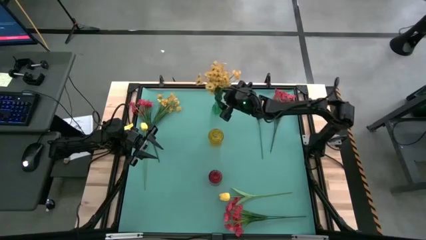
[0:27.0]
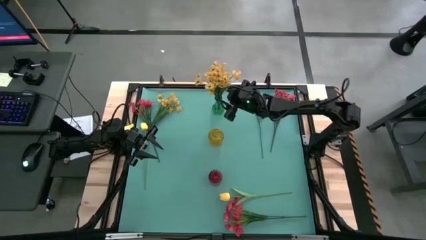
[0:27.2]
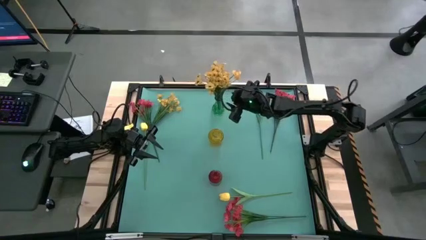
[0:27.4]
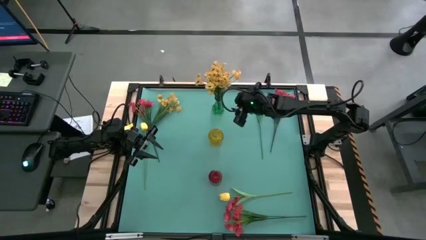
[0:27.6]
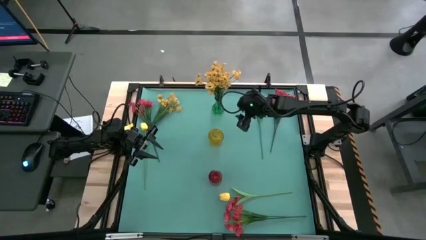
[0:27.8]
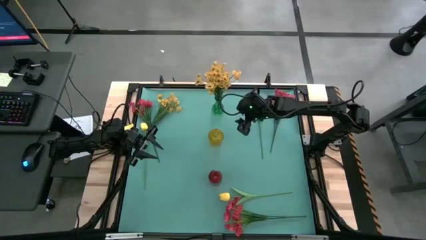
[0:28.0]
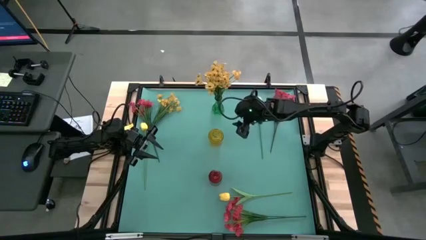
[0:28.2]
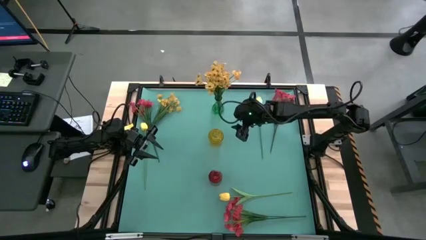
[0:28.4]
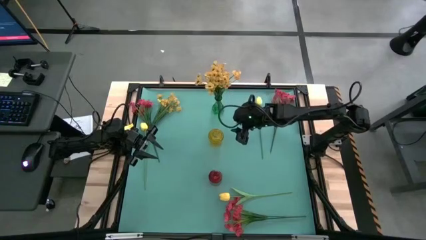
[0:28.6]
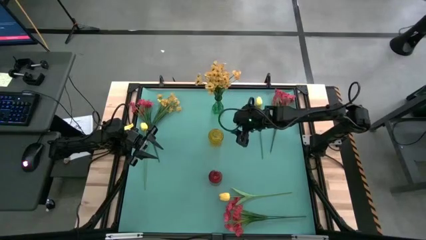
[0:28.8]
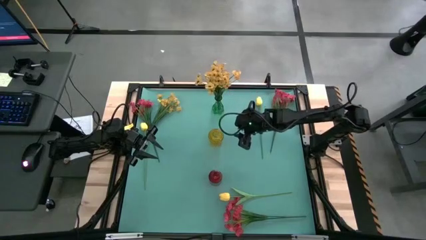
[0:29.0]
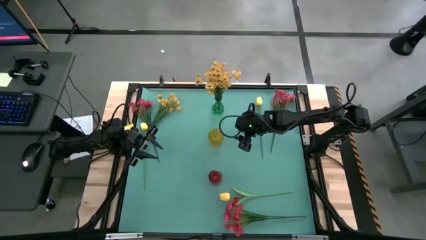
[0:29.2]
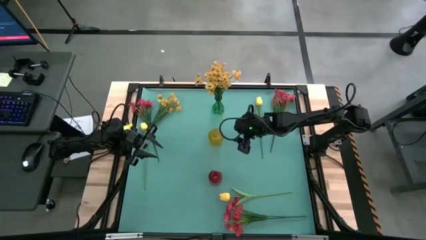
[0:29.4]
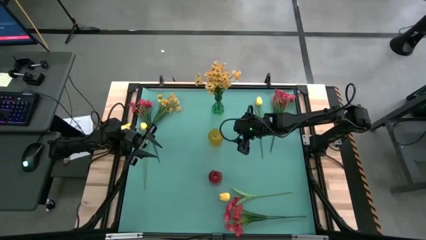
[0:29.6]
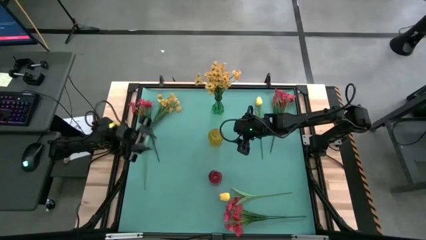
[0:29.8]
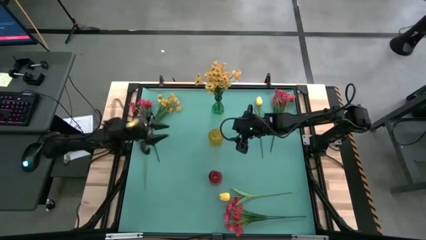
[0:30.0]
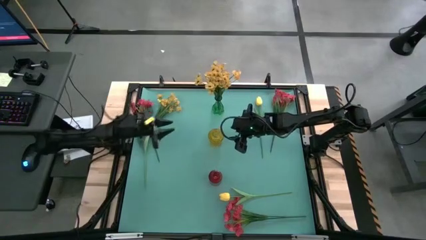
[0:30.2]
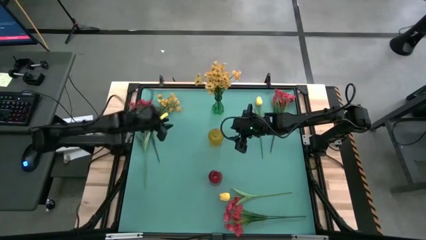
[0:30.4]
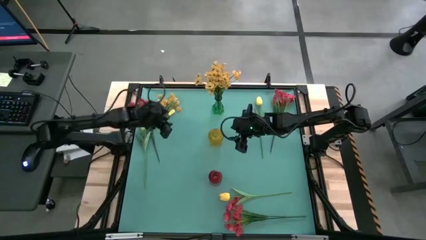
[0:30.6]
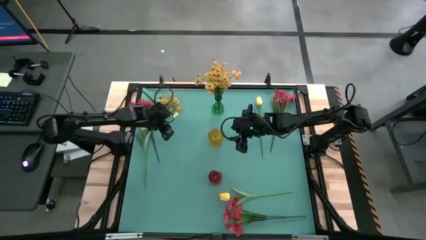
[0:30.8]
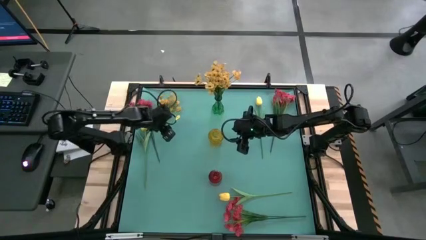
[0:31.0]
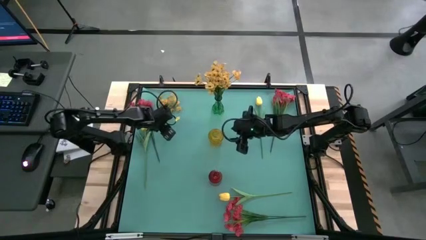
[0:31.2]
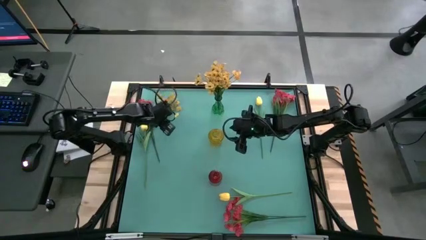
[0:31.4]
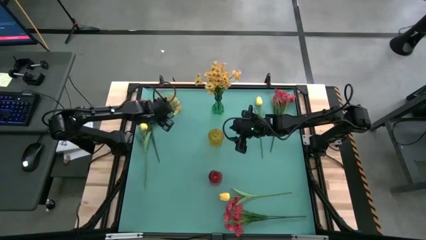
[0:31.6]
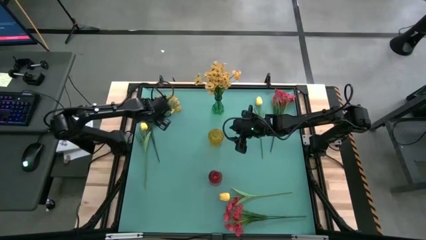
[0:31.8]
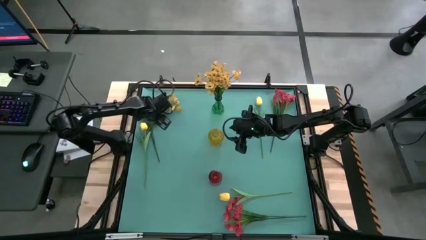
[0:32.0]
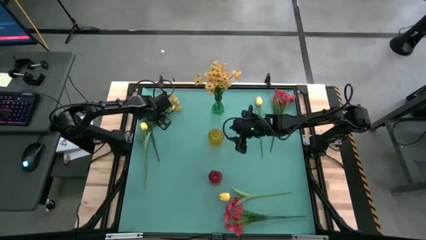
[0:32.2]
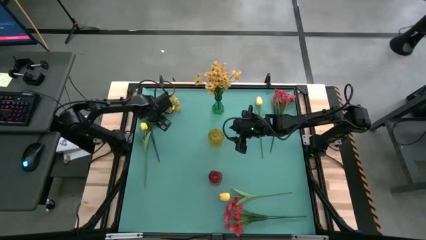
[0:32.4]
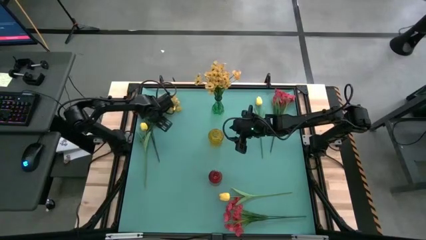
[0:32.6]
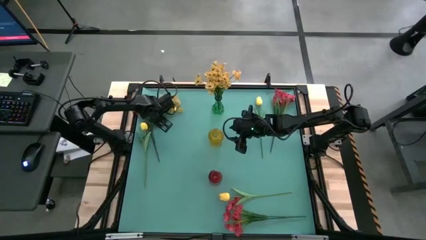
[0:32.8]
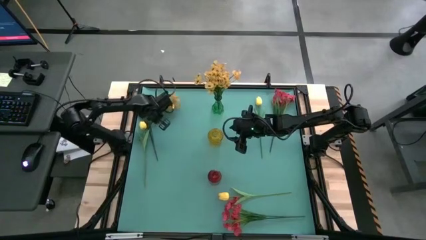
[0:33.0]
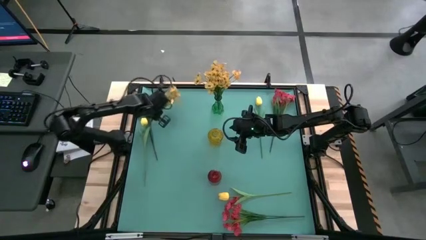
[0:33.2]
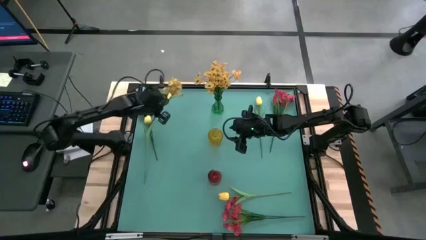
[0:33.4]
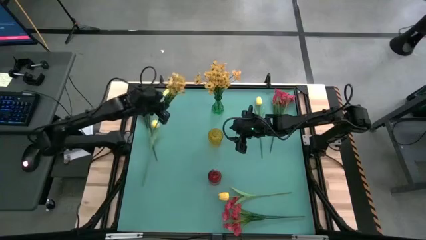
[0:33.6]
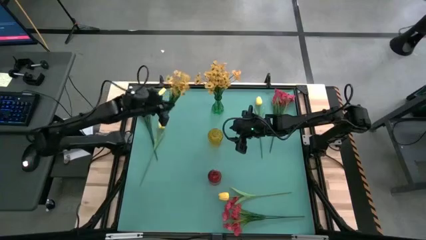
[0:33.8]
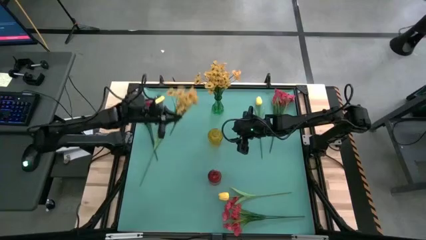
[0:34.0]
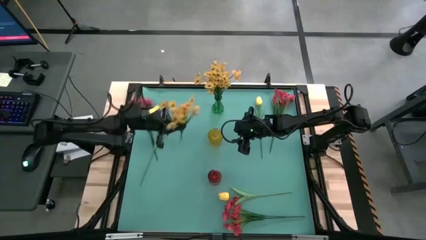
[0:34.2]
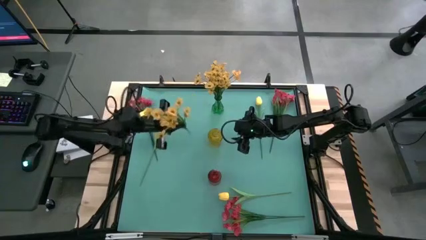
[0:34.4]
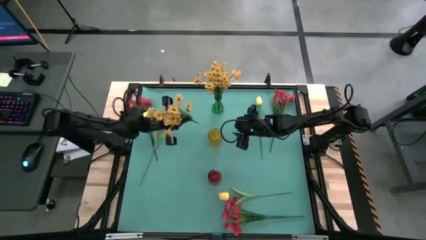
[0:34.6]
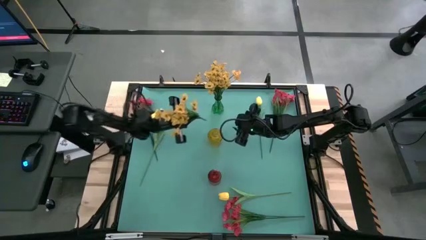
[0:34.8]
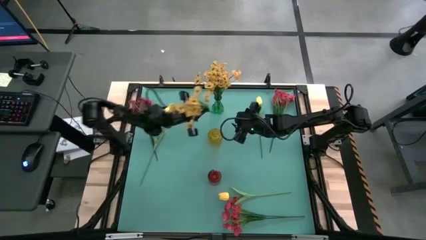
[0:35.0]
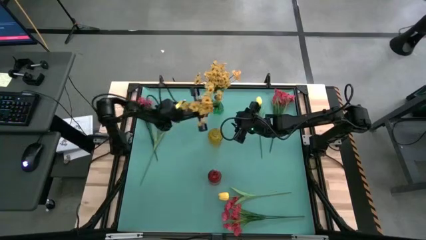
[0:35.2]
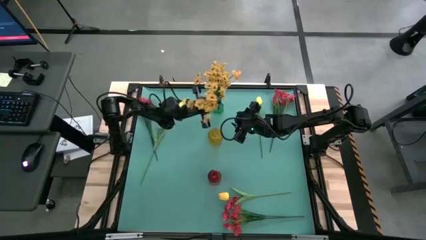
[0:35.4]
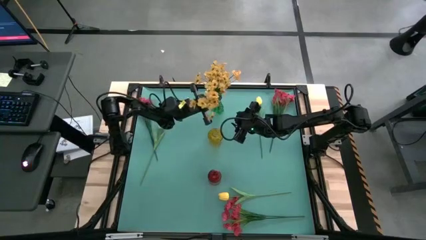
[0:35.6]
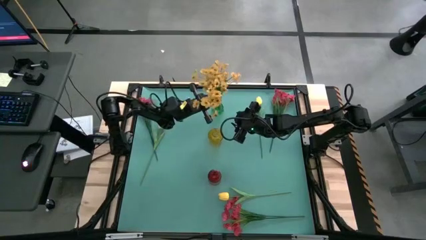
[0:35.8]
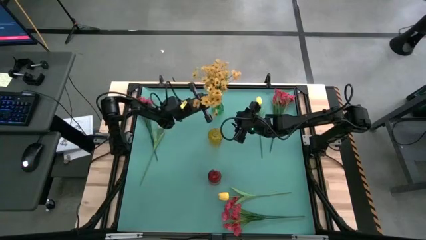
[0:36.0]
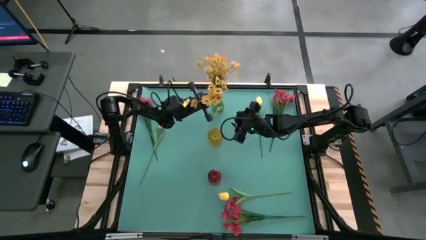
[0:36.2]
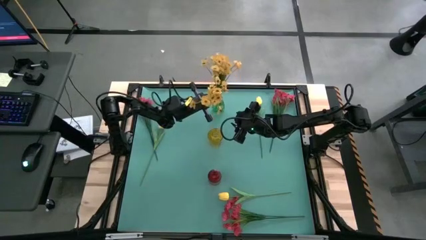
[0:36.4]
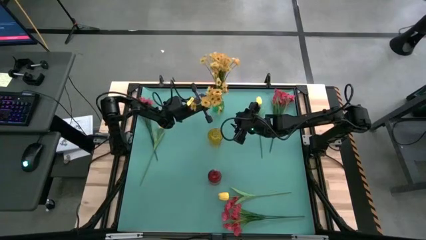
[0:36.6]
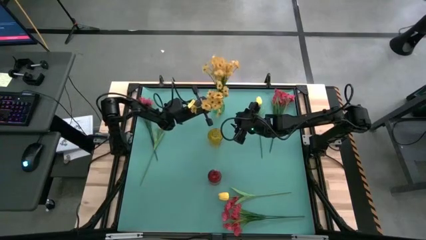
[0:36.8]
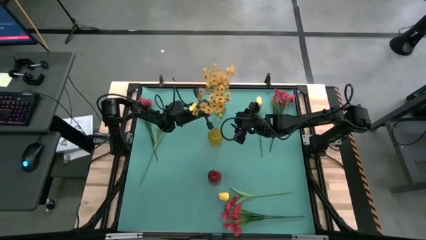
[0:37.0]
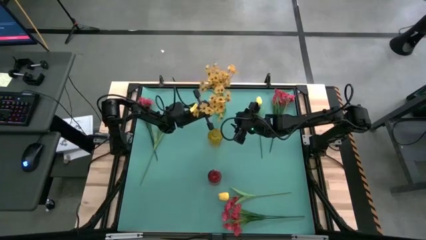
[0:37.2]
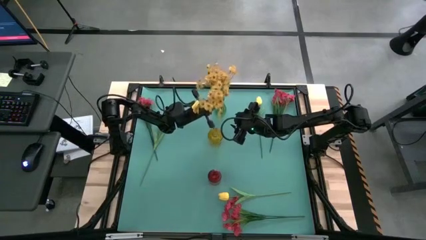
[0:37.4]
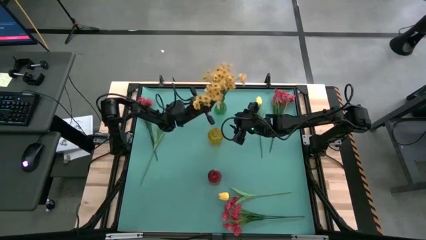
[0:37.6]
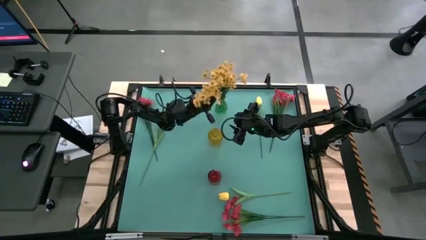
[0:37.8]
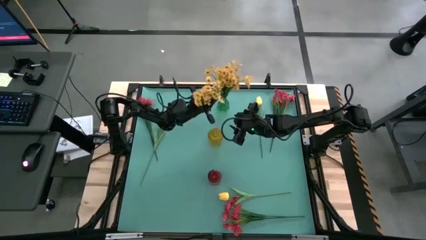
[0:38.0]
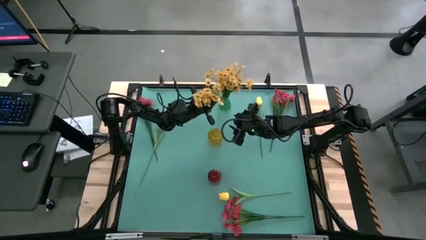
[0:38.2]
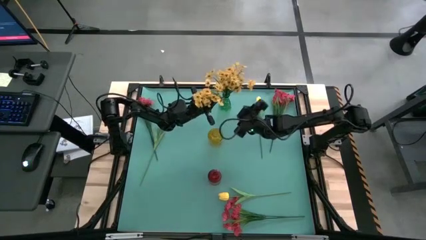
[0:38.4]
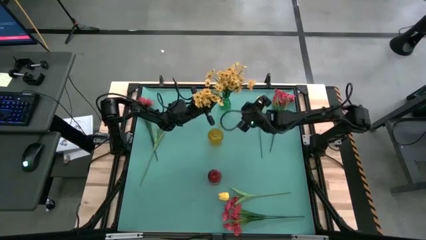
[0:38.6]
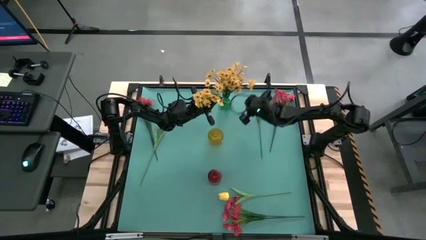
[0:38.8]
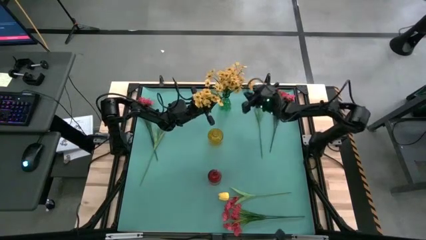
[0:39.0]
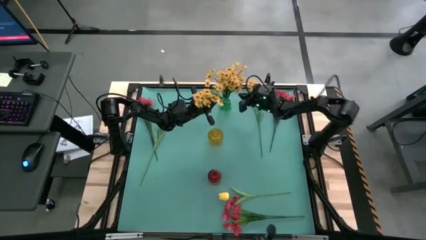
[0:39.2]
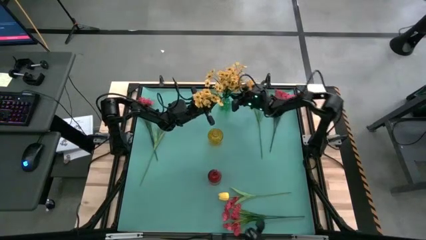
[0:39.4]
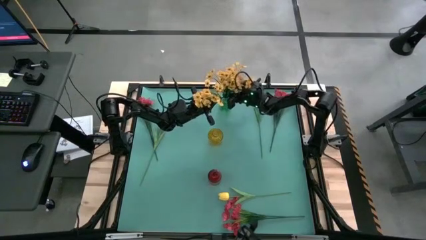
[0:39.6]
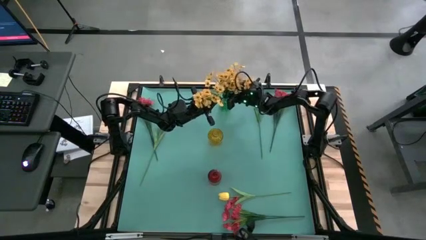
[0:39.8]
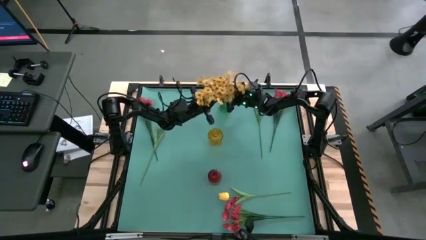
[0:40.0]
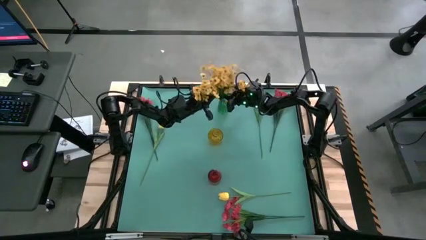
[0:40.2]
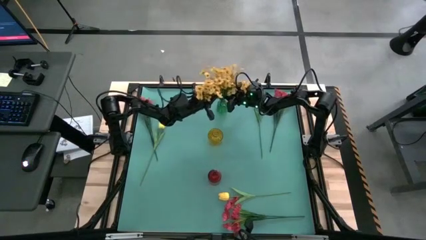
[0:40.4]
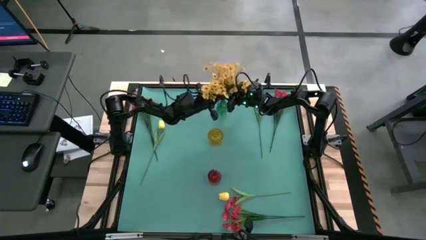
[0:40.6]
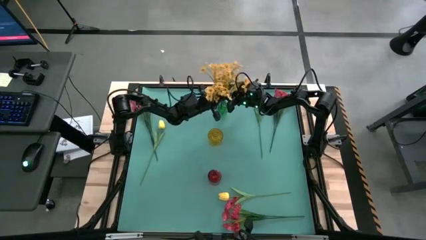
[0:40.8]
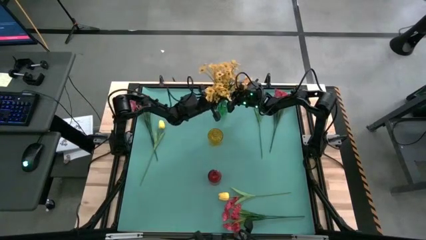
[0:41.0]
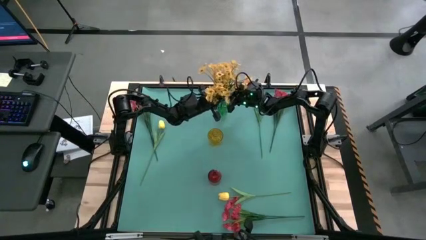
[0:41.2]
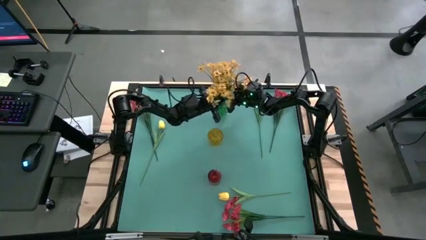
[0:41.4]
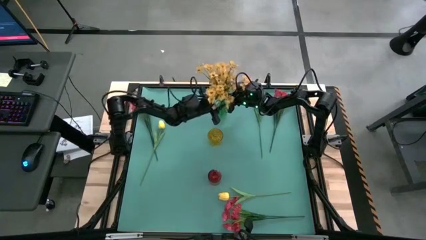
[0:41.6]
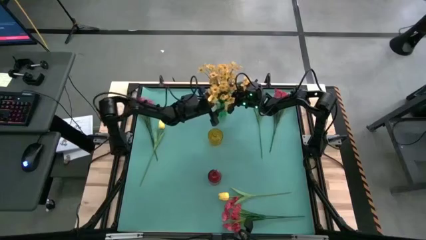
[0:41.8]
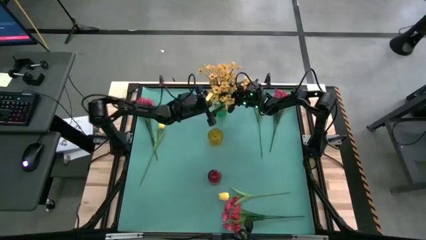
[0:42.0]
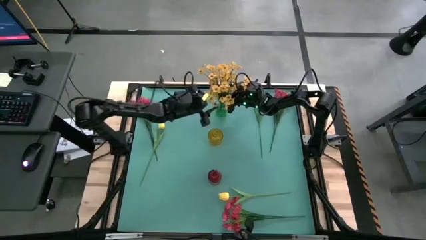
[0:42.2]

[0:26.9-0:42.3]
Task: Sort flowers into vase by color
Put the yellow flowers into the green vase
